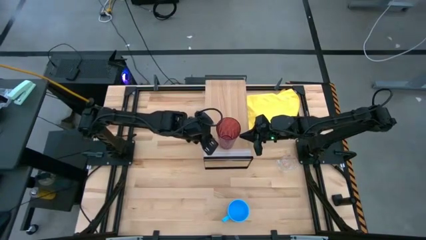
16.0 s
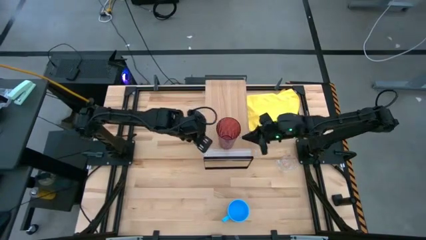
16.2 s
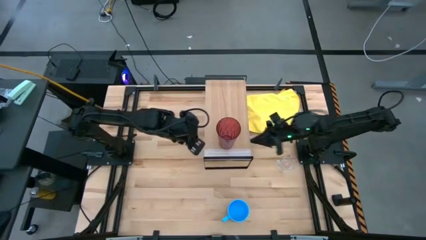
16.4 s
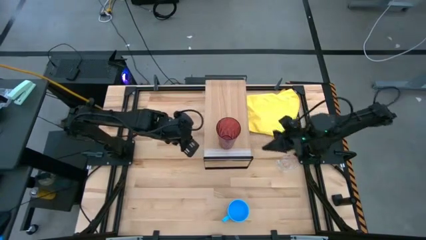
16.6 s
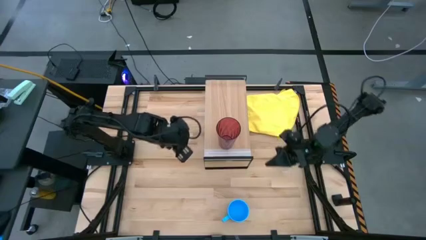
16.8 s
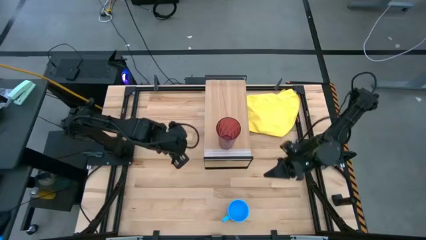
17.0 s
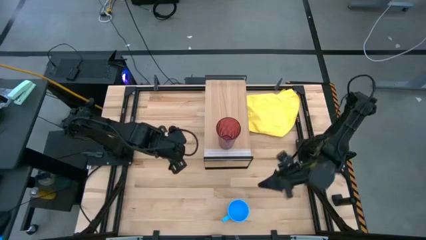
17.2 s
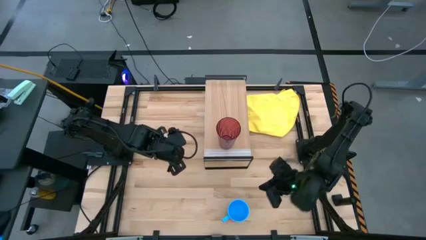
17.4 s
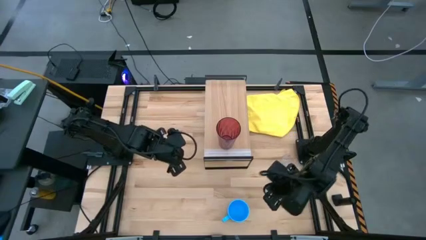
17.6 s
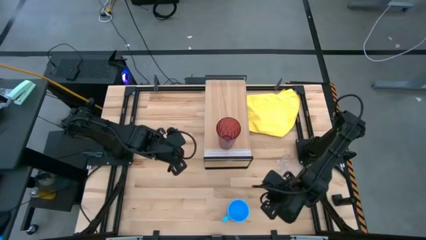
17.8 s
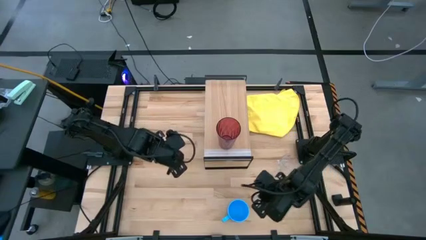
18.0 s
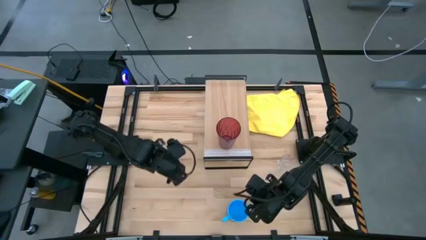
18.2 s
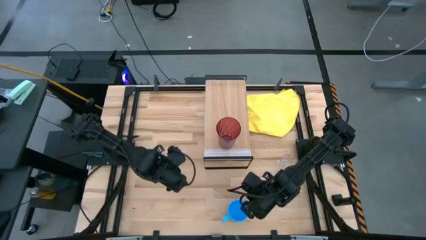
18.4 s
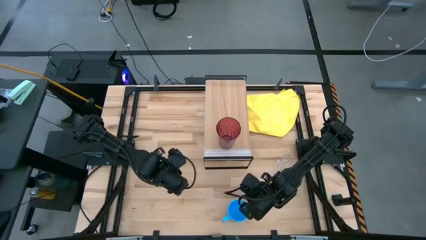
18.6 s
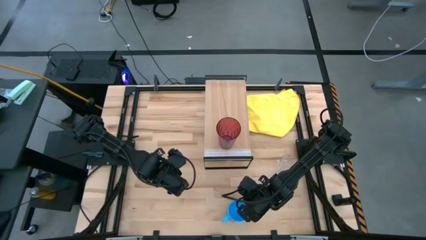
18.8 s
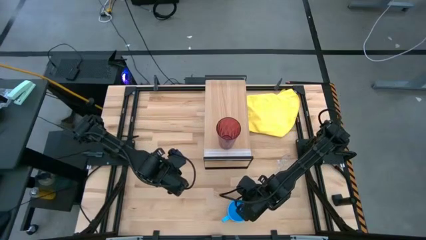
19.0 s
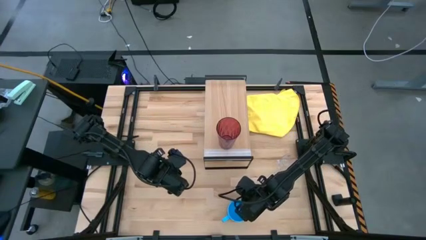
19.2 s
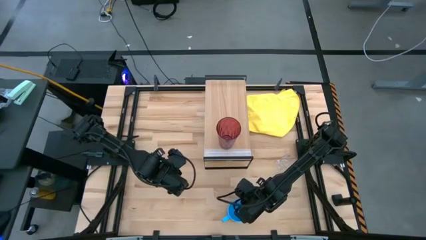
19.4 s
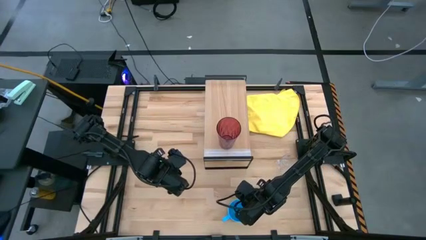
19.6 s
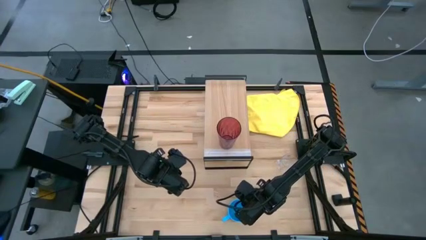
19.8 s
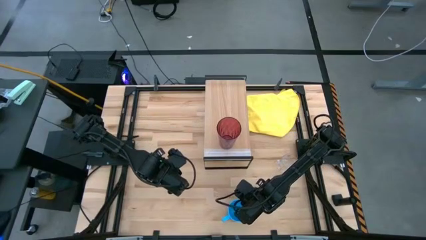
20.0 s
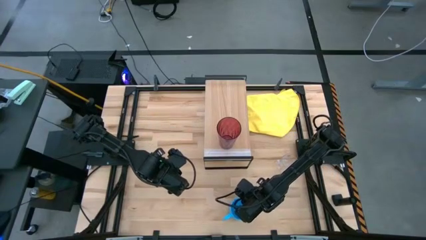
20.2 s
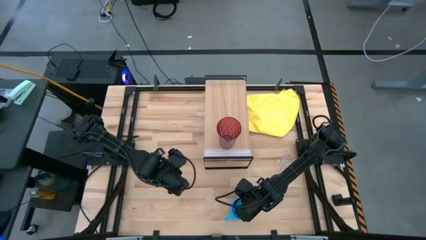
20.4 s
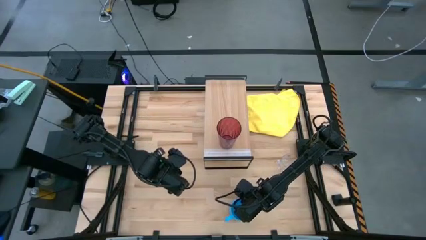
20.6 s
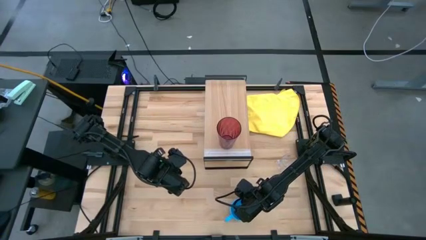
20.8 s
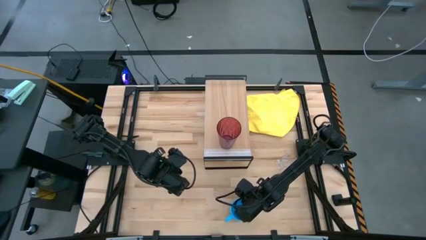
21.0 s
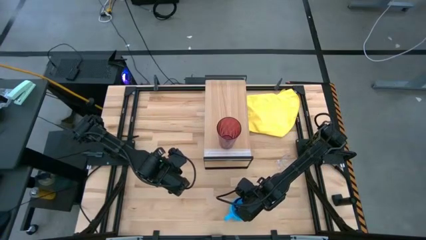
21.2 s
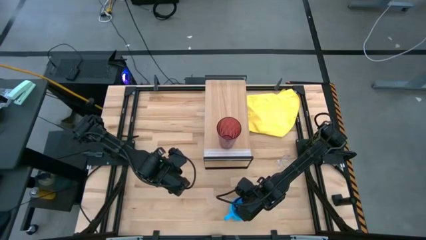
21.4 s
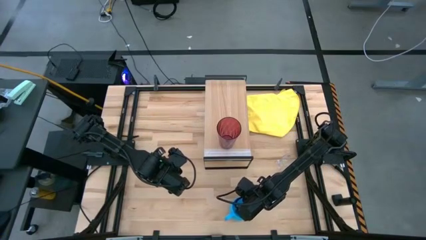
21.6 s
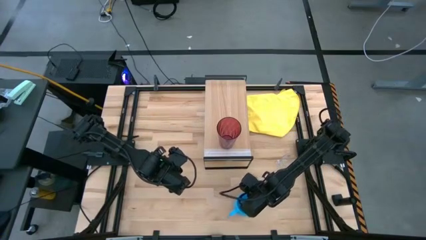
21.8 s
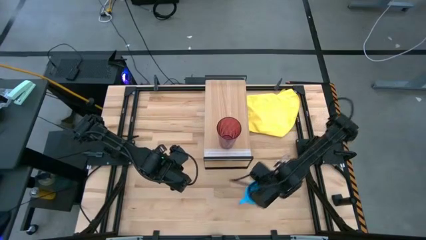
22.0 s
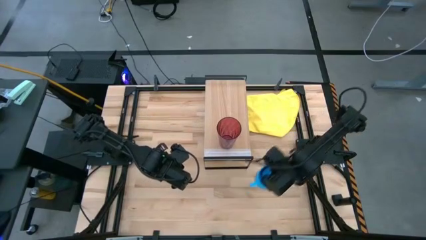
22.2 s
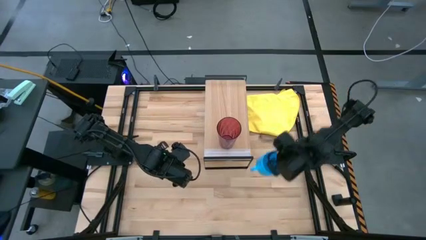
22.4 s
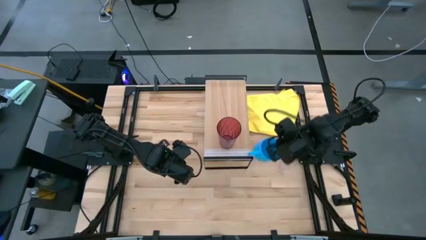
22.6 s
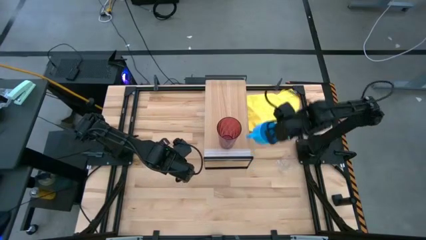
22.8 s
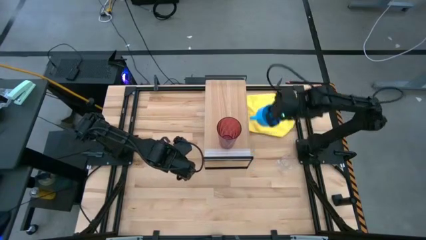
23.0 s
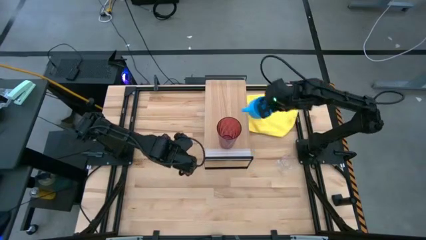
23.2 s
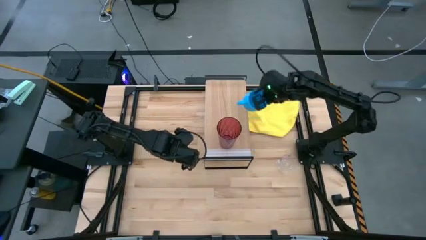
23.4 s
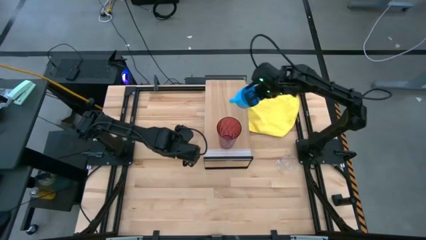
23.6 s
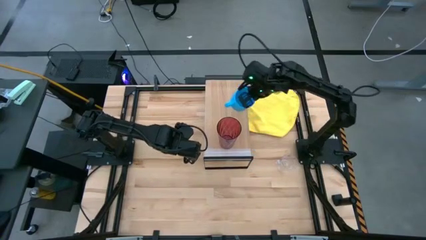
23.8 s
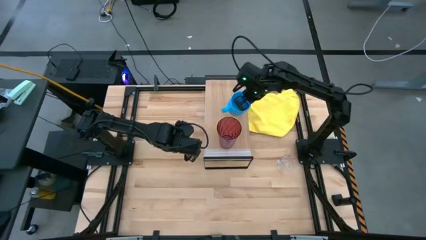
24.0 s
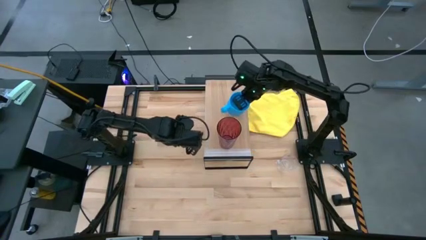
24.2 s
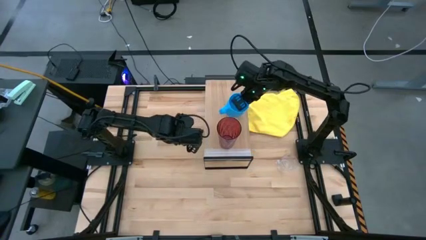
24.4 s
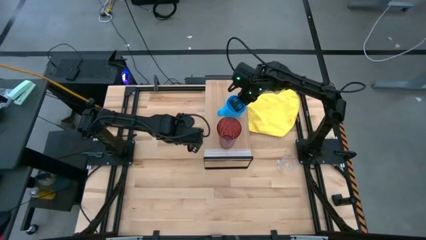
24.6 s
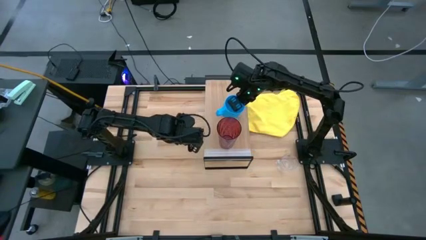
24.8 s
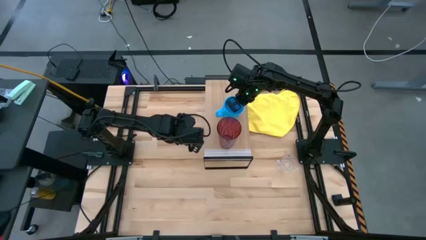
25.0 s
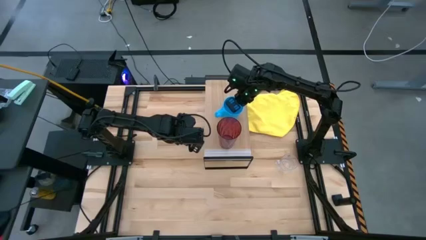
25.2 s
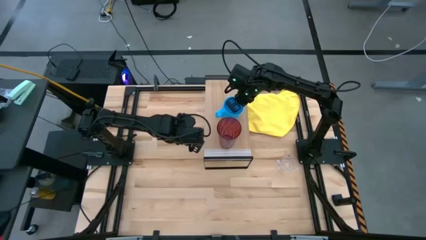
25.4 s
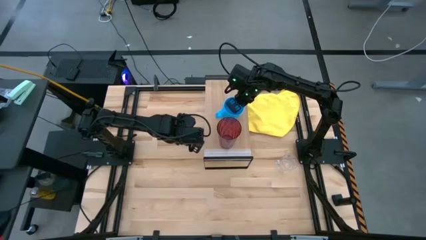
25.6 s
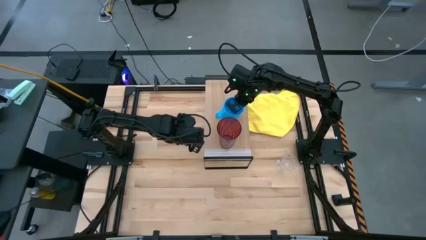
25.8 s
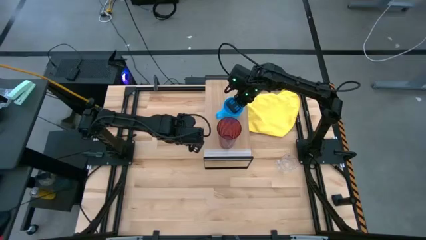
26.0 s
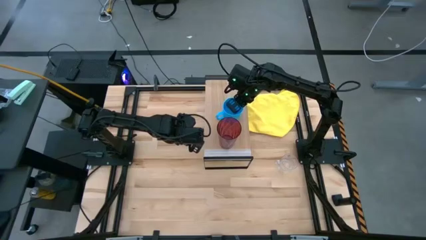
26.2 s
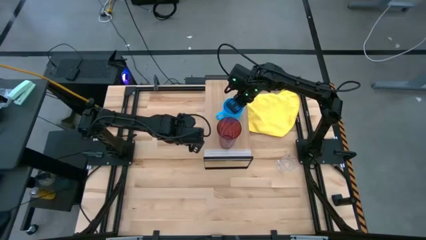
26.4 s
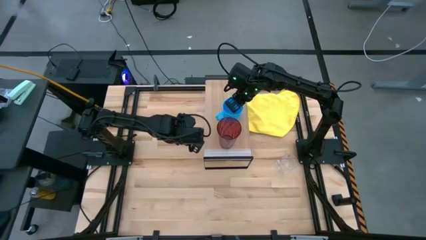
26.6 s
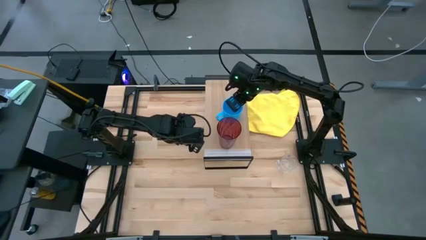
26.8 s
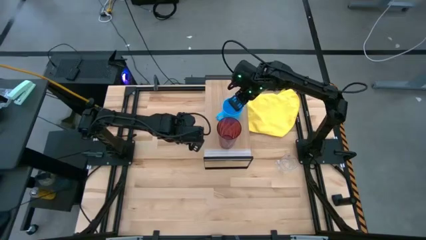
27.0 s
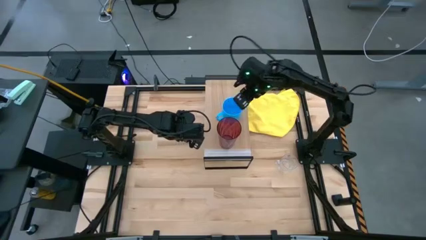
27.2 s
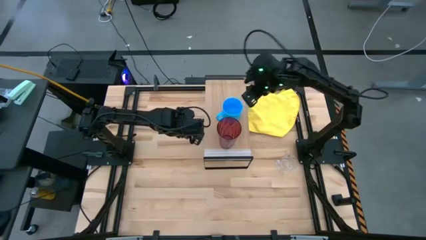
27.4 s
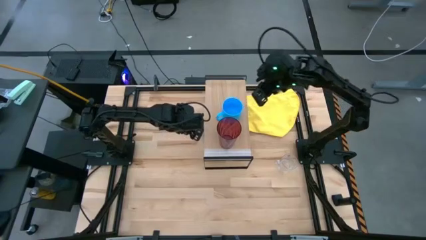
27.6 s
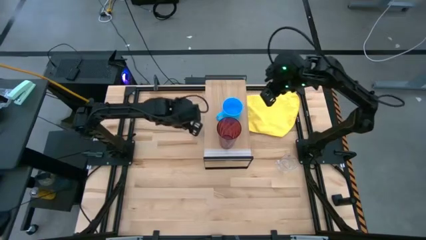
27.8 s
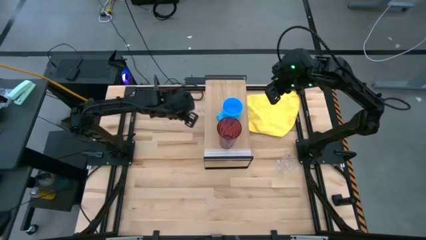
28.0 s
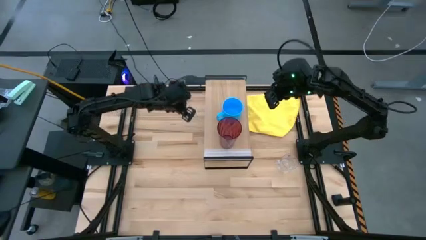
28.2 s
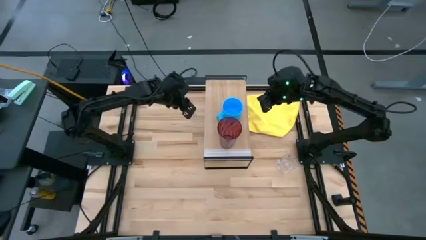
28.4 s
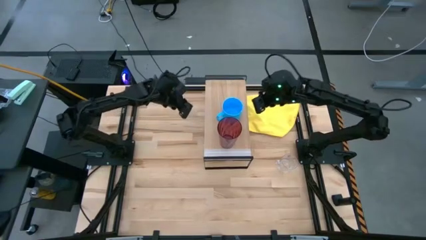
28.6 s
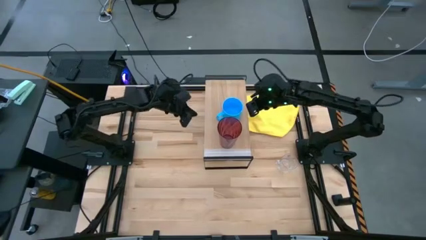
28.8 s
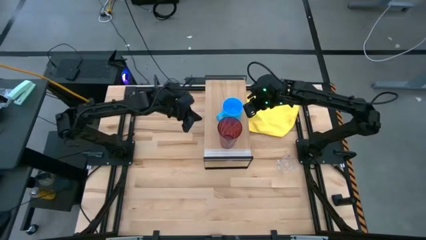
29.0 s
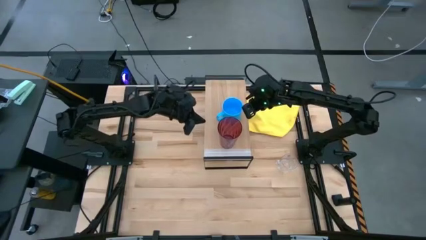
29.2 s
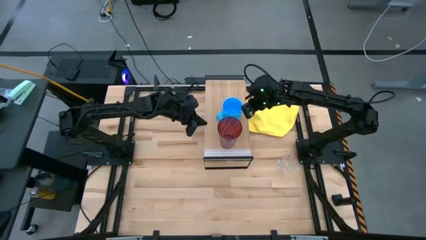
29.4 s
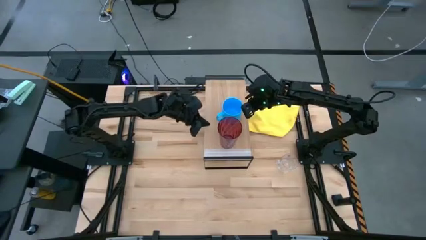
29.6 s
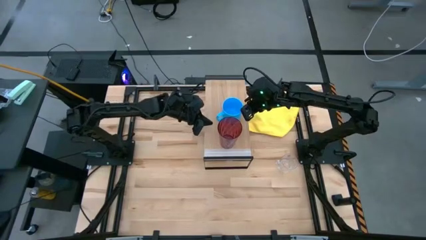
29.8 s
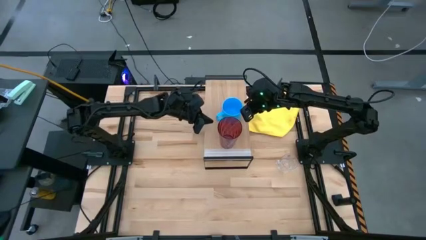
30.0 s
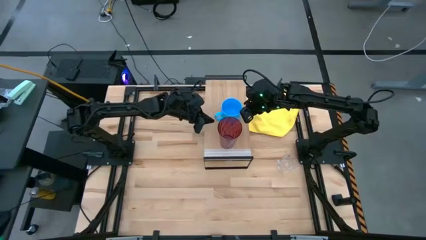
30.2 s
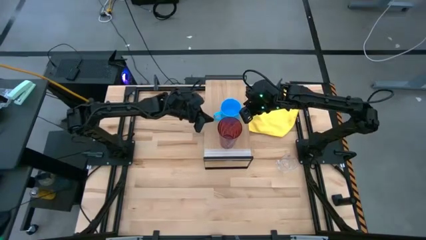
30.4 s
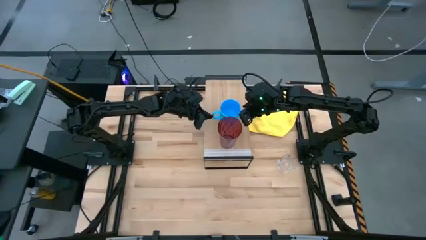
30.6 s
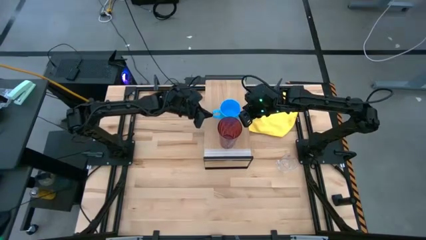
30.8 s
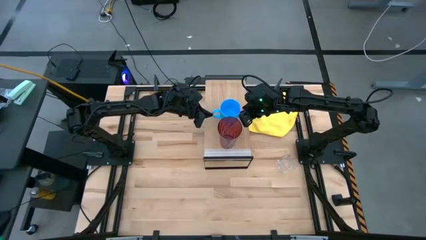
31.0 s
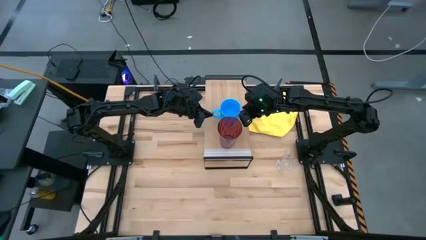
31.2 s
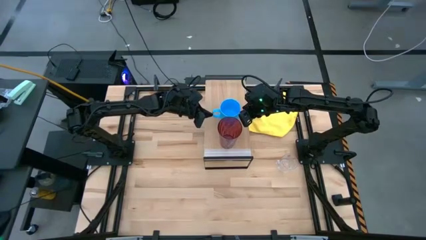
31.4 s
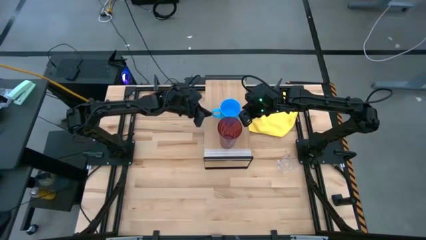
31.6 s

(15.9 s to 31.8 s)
Task: Stack small to large cups/mugs on shelf
Put the blue mug on the shelf
